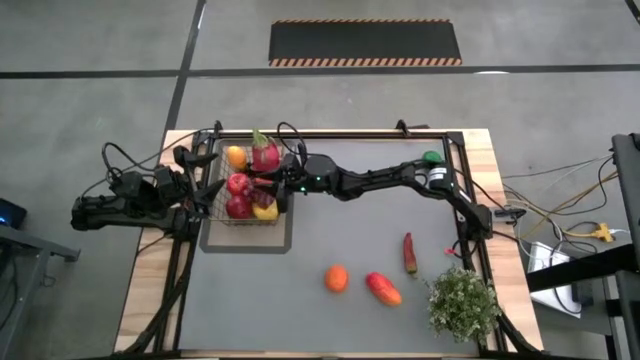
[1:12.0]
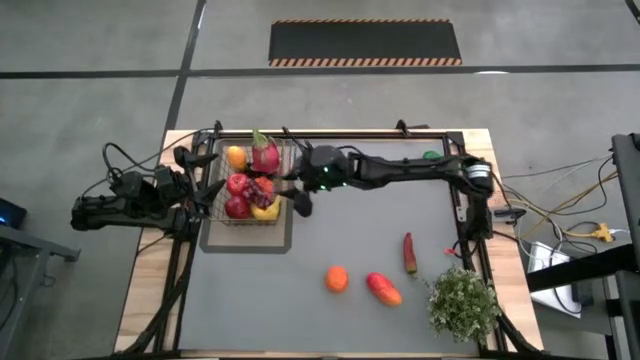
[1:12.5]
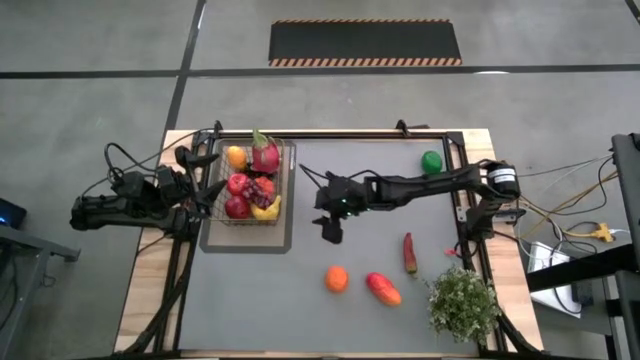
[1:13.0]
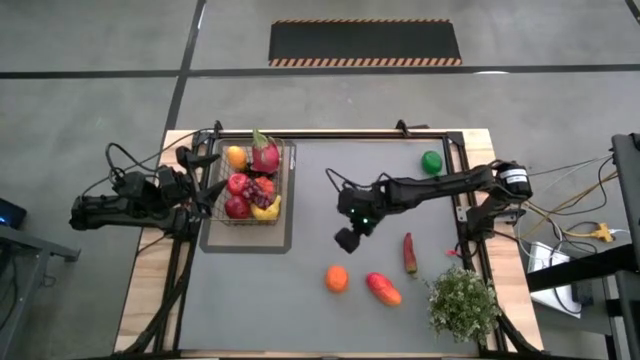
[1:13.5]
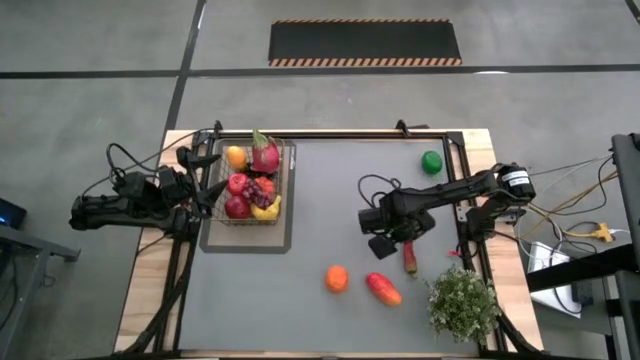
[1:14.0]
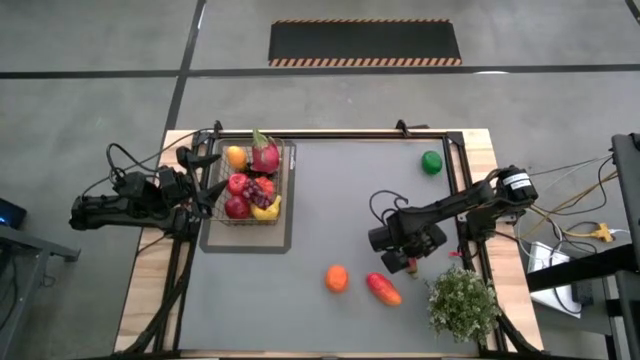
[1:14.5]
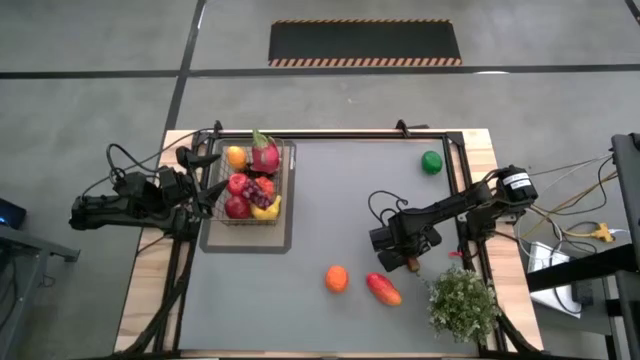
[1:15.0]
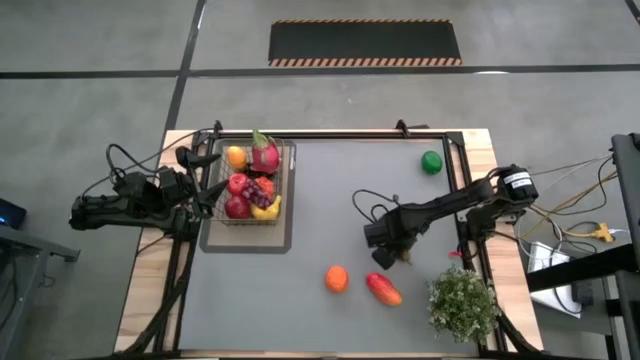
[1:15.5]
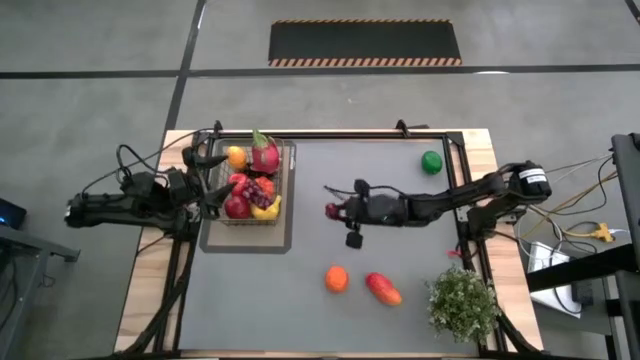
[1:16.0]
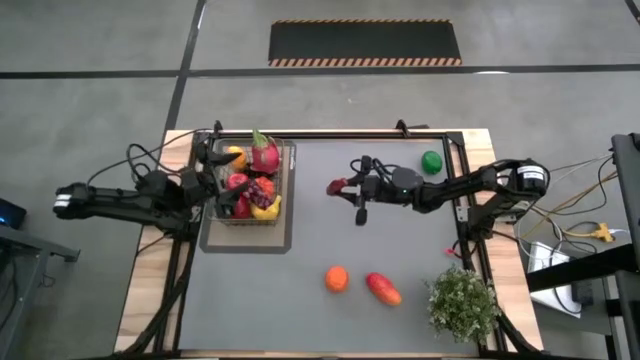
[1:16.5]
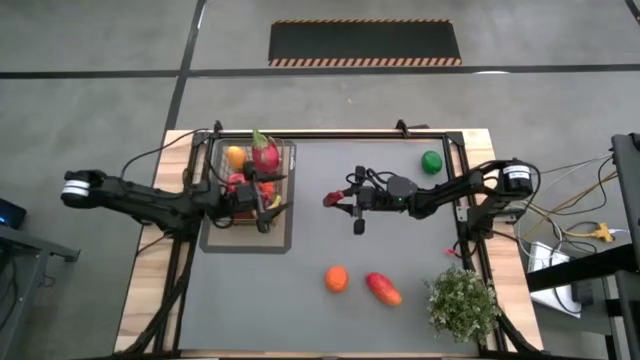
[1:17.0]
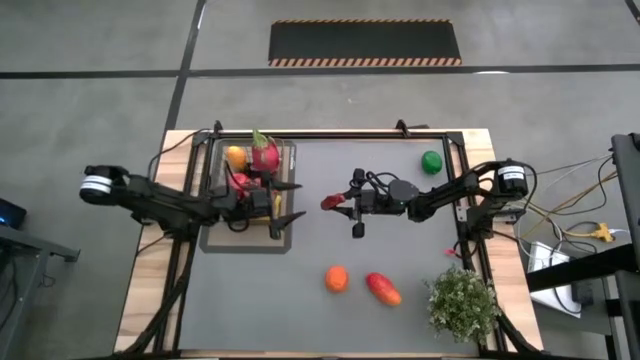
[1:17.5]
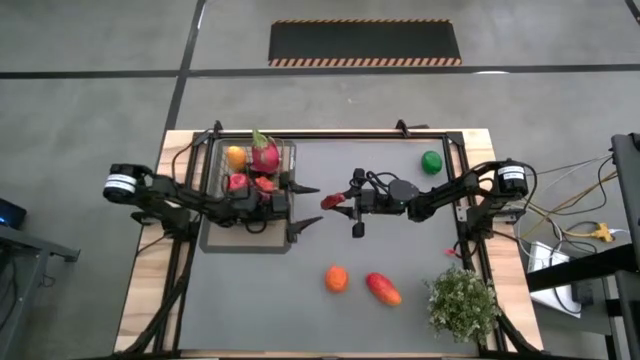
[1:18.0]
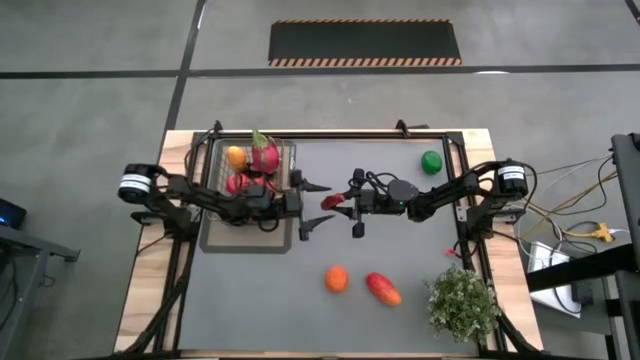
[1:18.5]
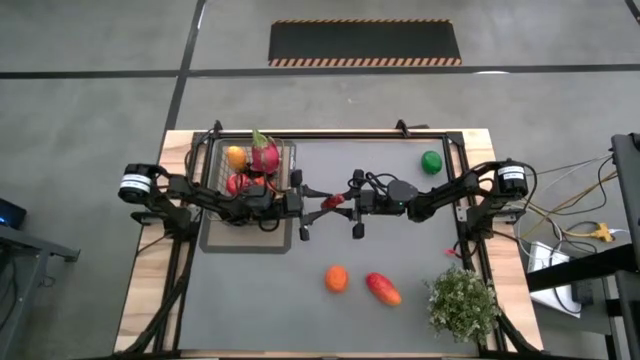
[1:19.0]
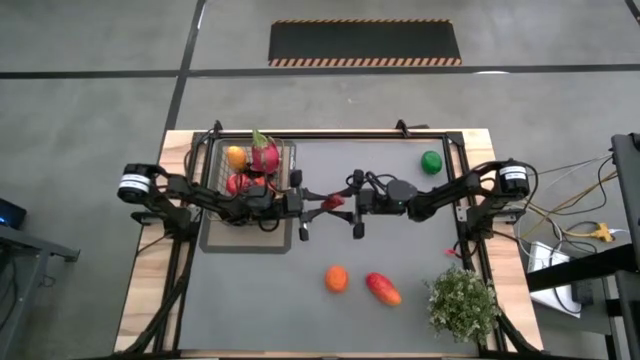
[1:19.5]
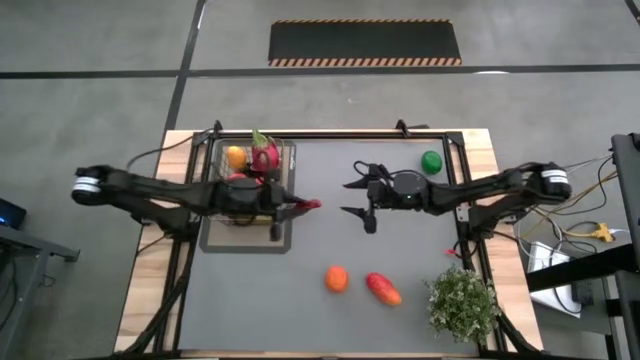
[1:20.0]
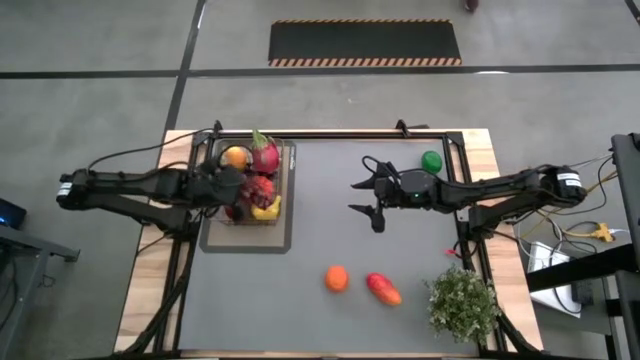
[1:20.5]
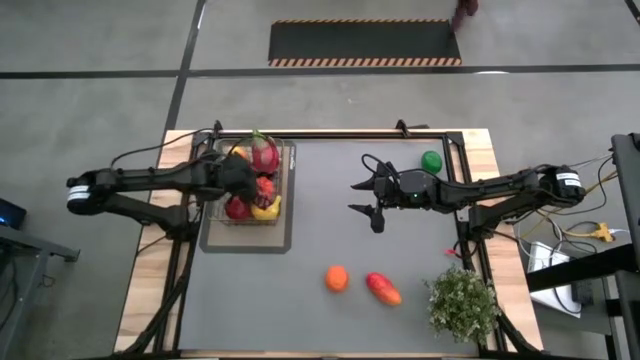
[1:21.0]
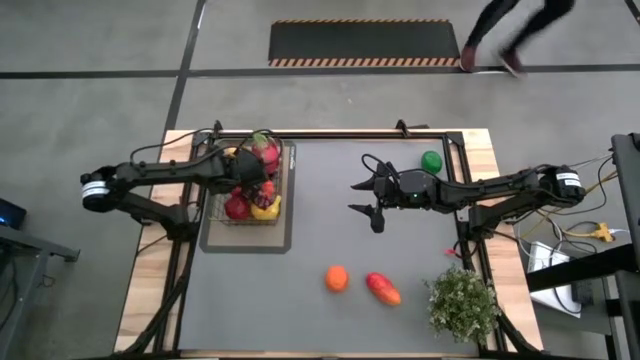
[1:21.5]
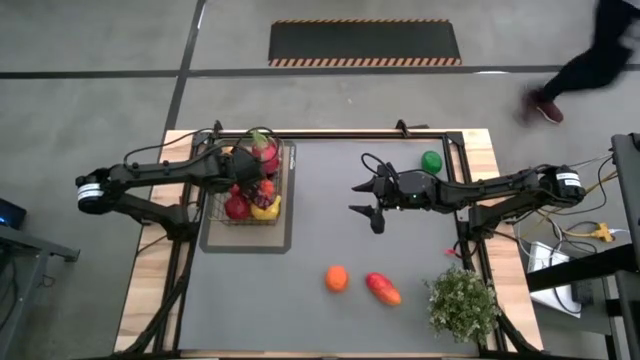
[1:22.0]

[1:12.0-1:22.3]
Task: Build produce basket
Put the red chili pepper into the gold wire basket

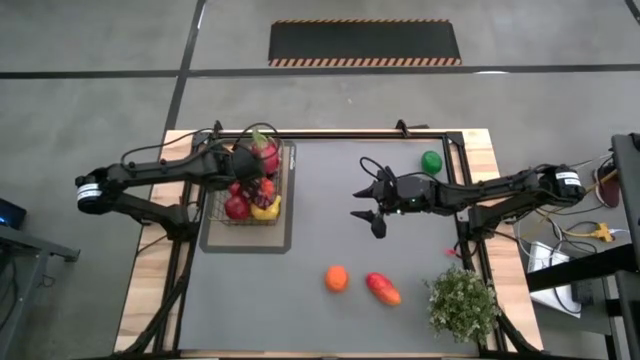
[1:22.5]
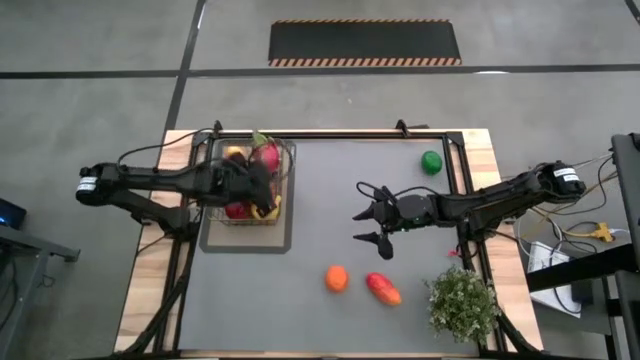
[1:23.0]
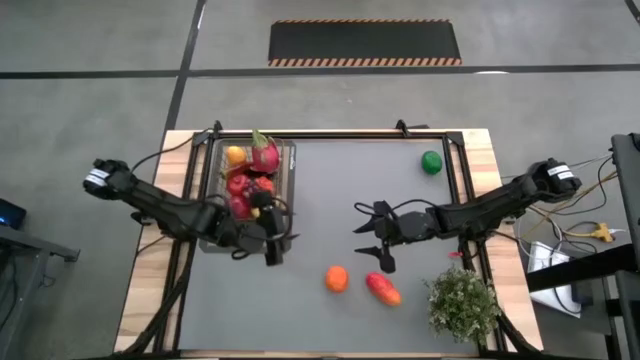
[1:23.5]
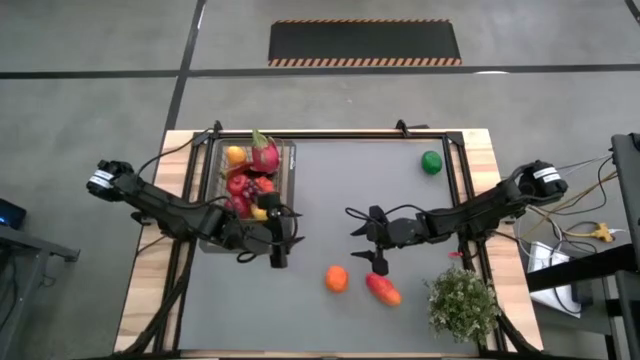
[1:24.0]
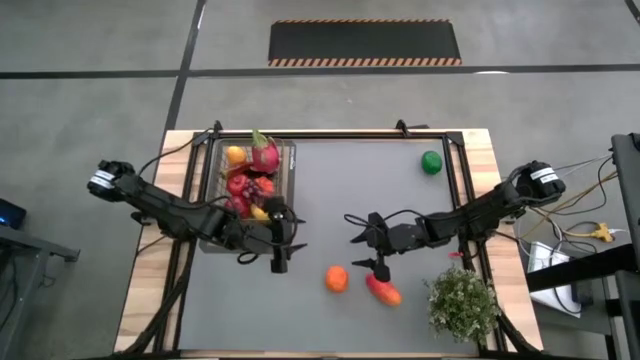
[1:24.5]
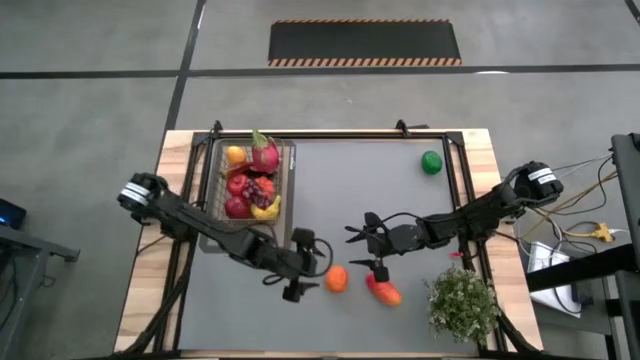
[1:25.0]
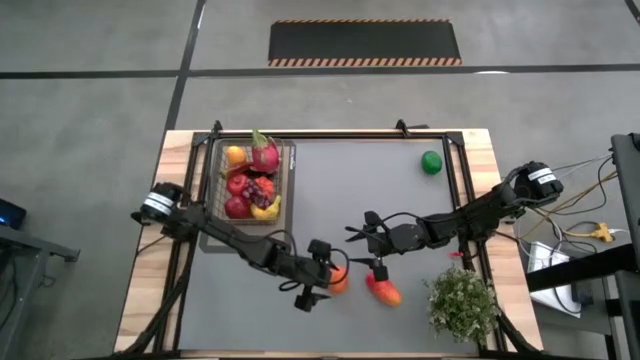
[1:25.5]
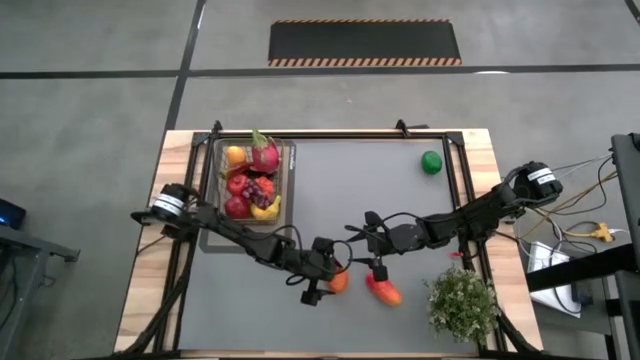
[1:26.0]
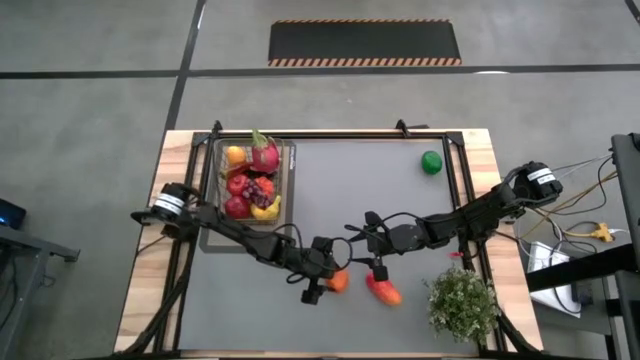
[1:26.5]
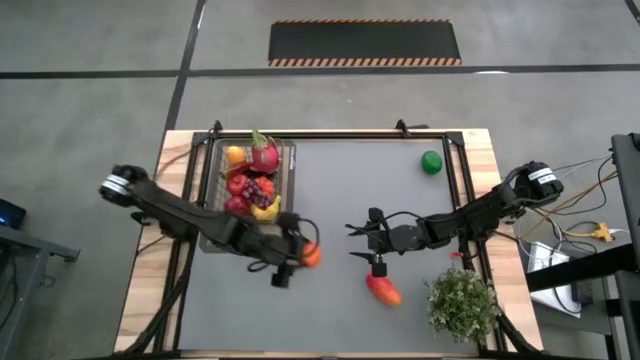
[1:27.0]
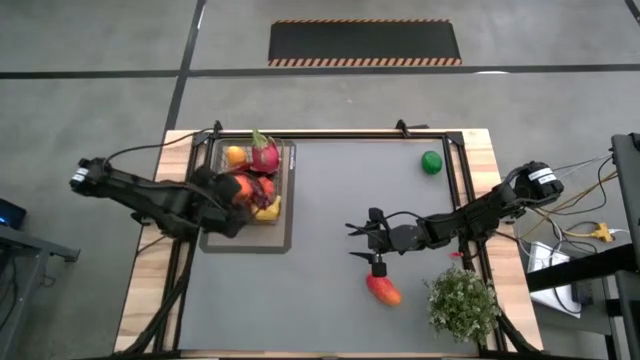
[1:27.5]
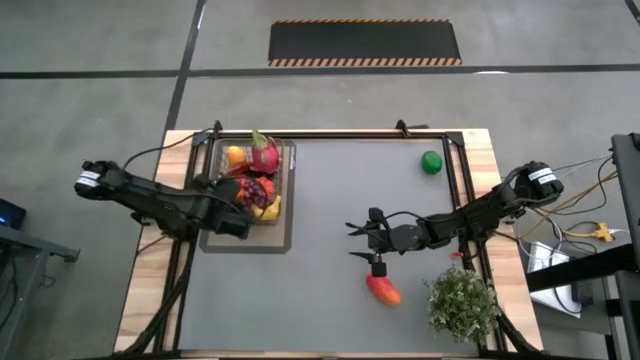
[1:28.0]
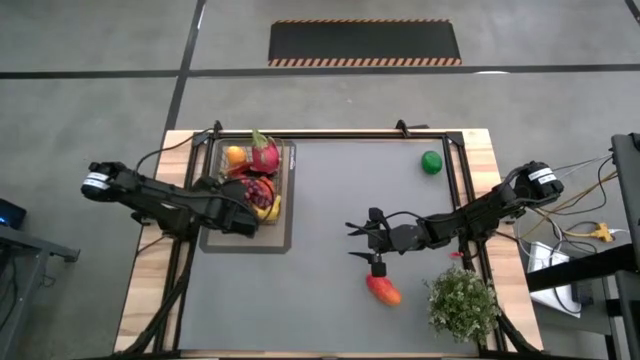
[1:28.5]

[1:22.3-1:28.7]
Put the orange into the gold wire basket

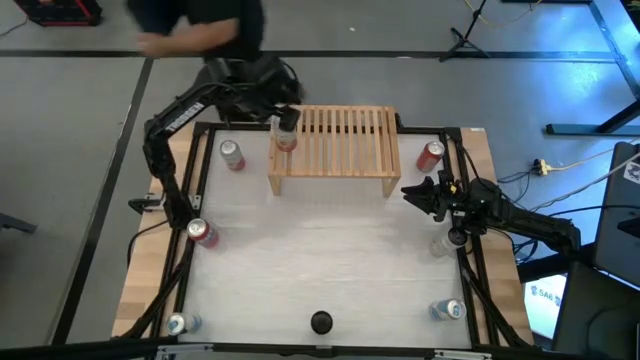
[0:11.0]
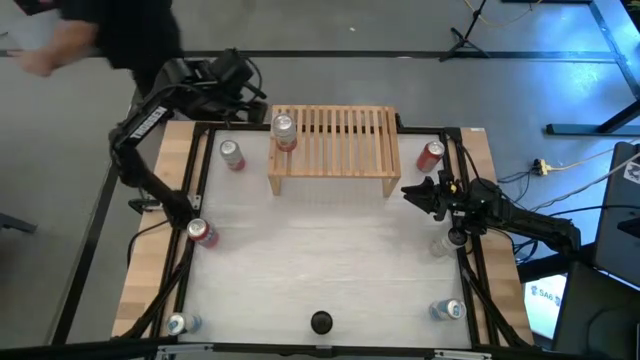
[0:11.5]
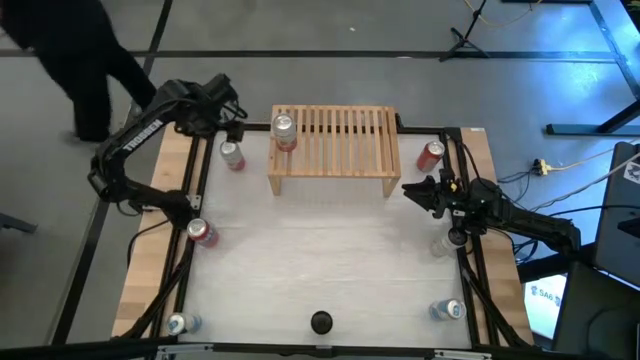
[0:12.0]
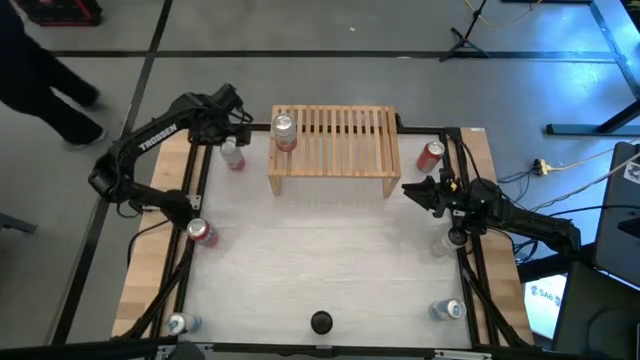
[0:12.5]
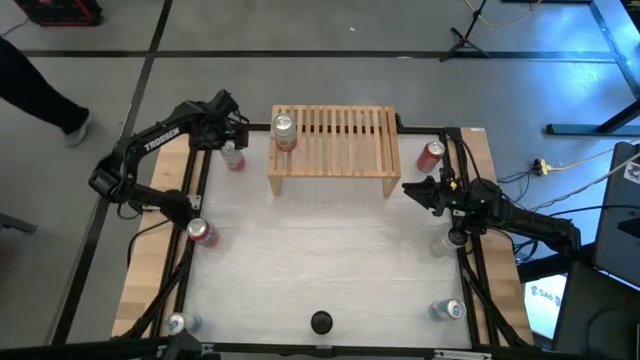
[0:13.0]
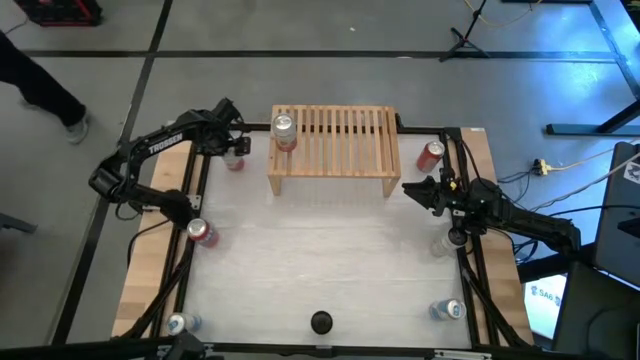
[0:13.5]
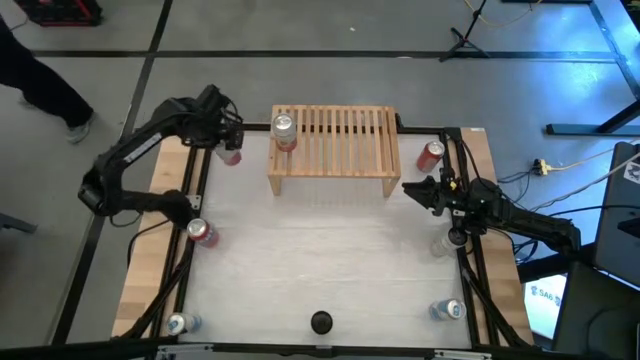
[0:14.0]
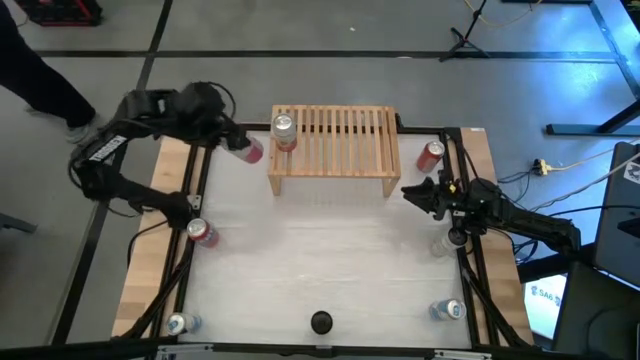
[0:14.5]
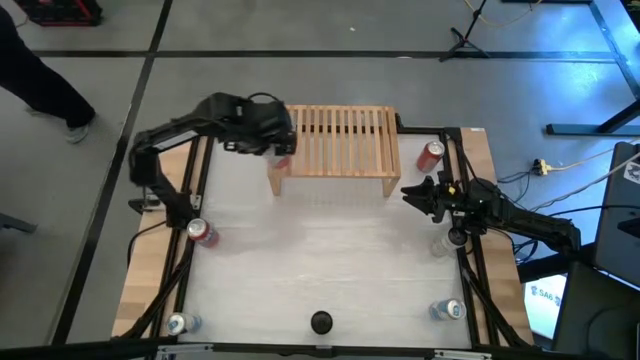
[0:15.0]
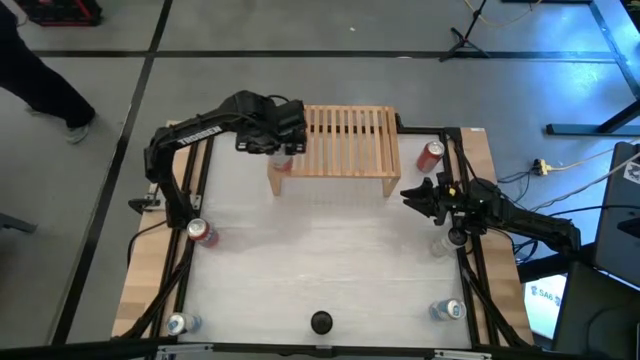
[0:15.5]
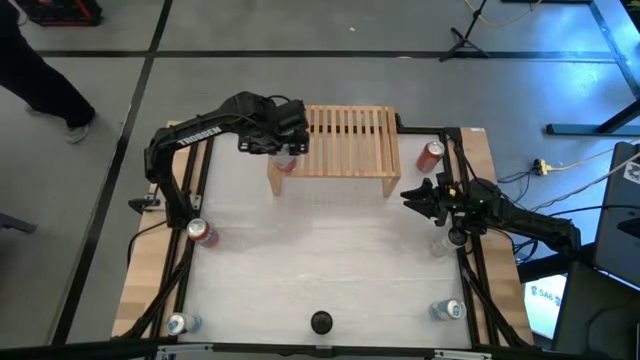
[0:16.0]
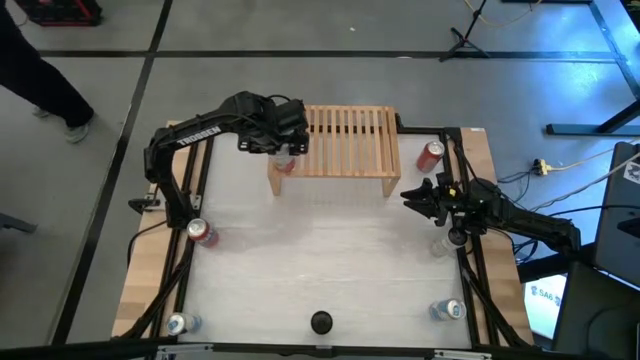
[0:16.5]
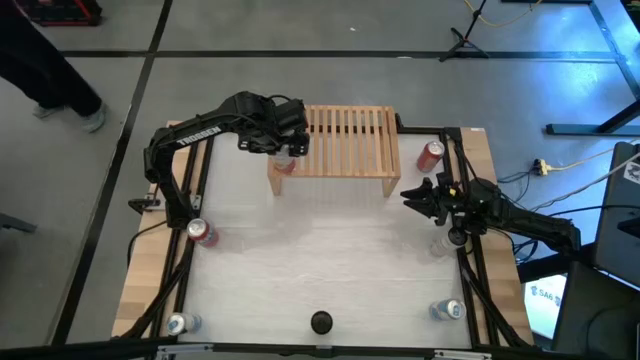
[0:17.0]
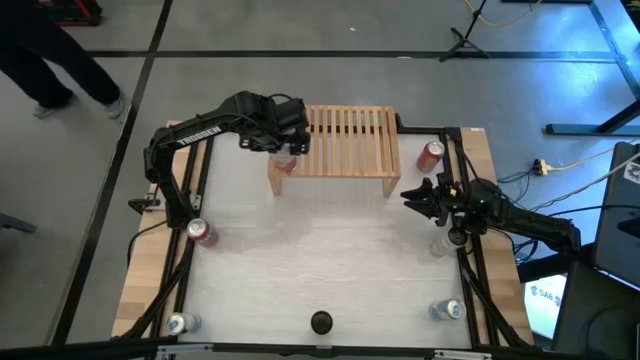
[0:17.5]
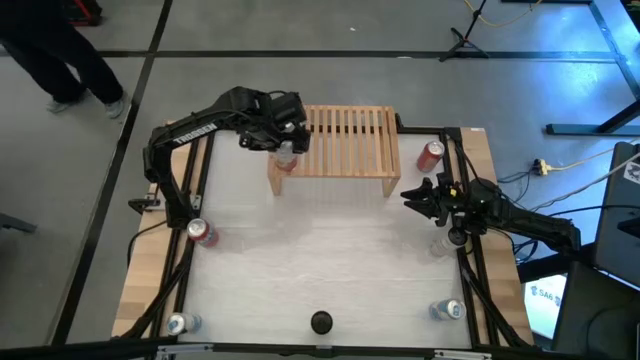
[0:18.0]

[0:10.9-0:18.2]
Task: Place canned beverage on shelf
Put the pink white soda can on the shelf aligned with the other pink white soda can
